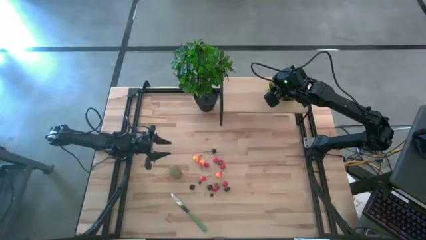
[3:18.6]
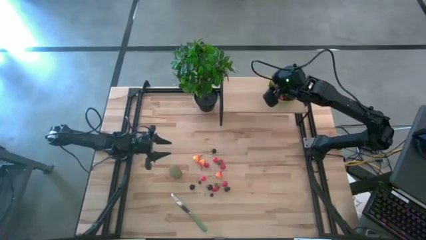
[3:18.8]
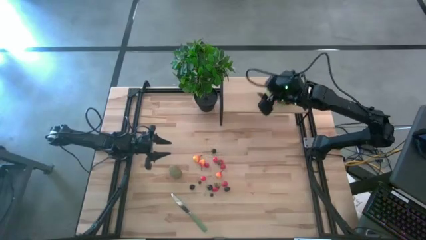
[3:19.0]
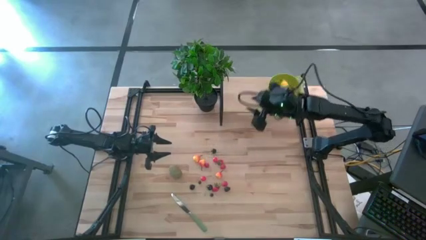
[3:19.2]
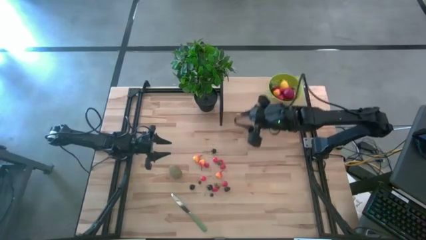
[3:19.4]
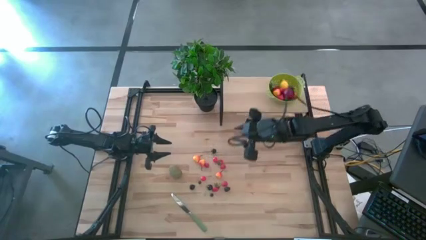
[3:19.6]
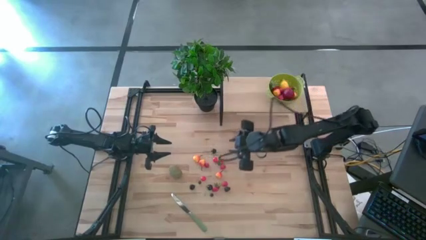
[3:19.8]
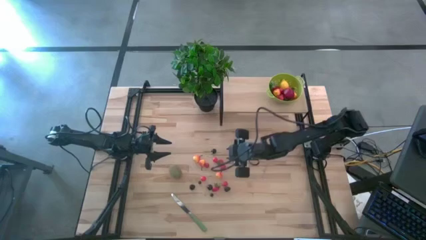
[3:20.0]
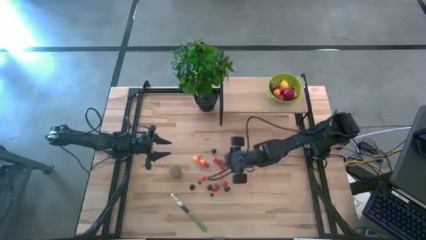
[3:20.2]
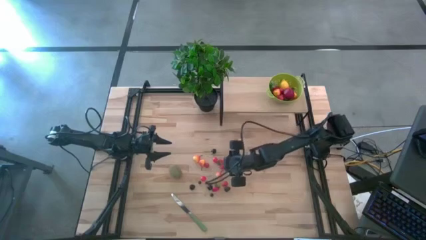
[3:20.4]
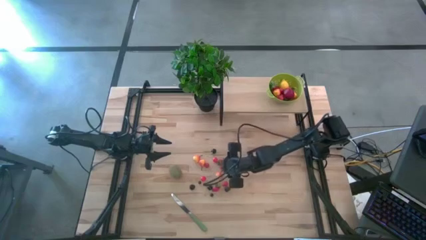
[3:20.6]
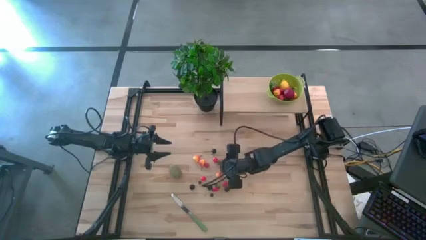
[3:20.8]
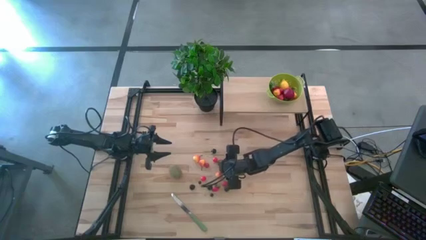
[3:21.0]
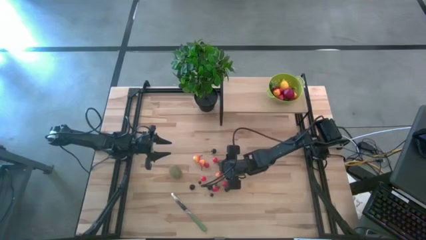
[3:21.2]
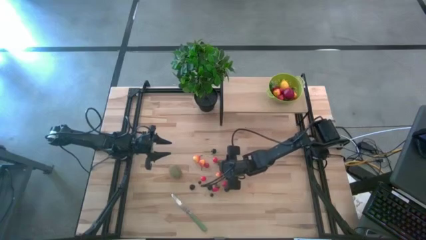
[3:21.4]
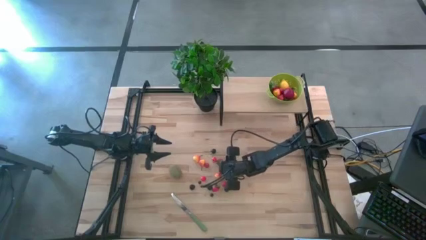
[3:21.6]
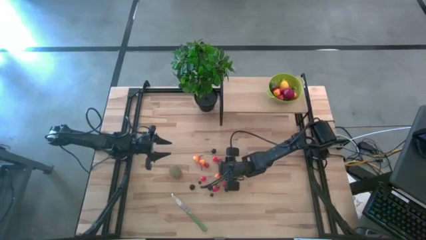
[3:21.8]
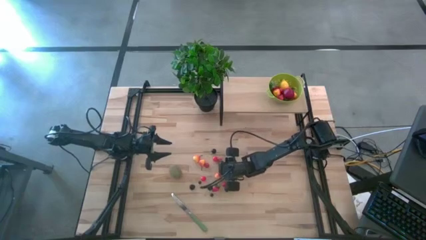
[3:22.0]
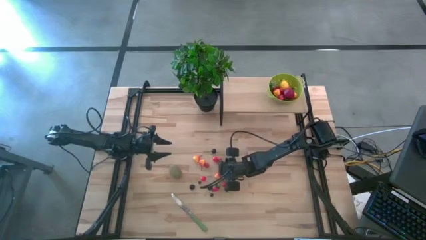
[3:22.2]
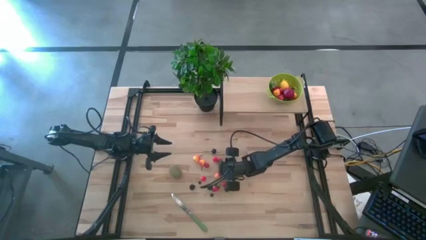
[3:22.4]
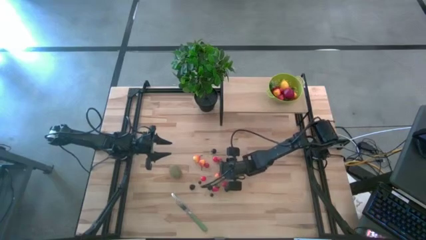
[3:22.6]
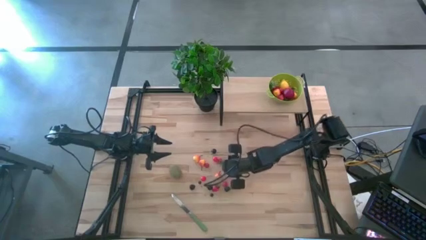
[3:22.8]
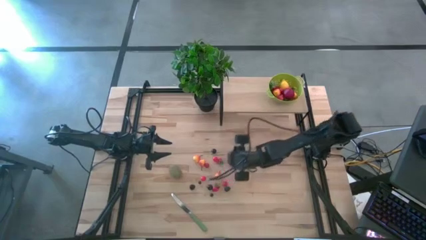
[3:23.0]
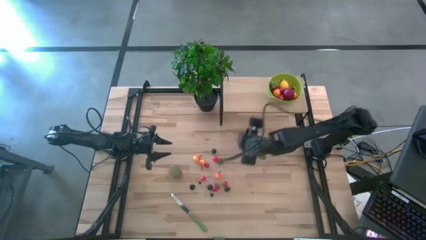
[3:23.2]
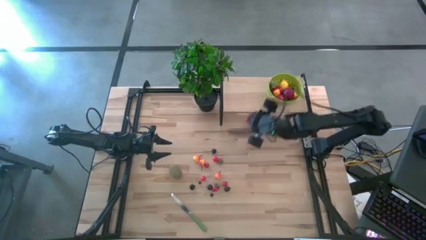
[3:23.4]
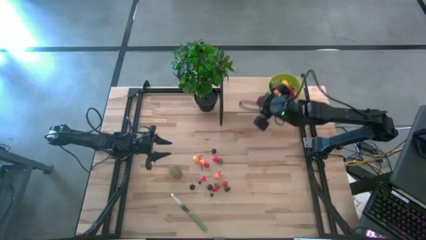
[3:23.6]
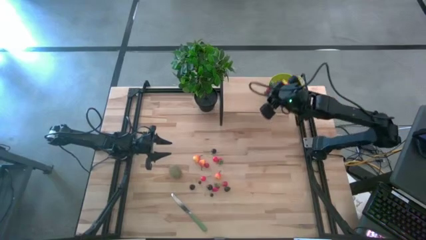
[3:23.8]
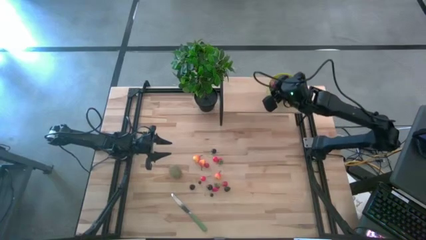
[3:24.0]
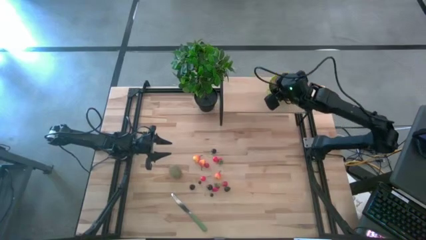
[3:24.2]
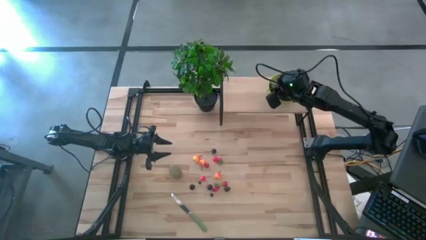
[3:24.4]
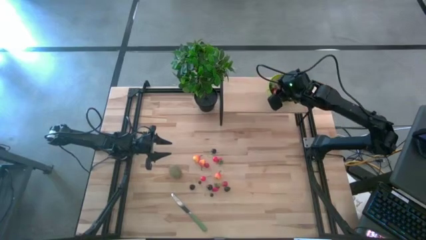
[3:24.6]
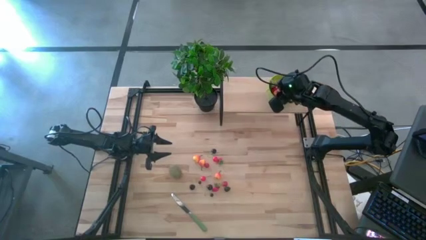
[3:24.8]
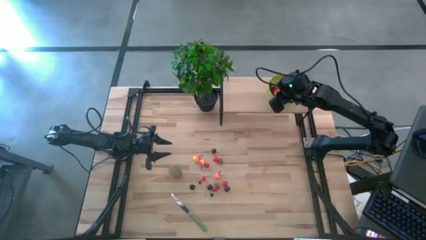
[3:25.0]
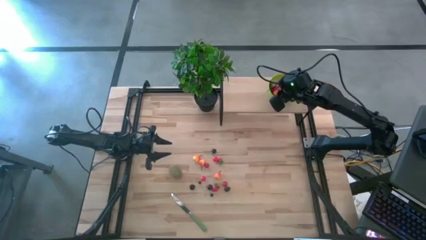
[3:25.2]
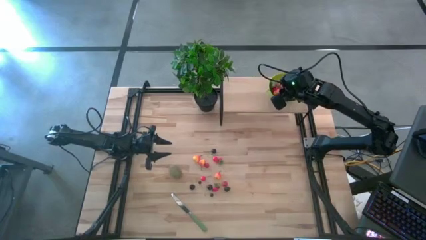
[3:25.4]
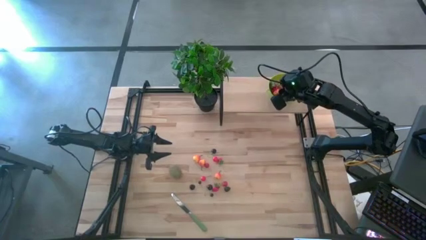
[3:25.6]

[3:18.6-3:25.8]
Task: Pick & Place Fruit
Put the raspberry into the green strainer bowl on the shelf

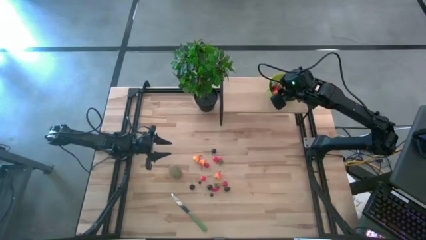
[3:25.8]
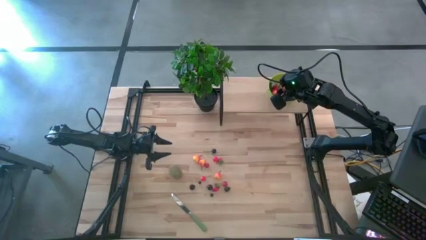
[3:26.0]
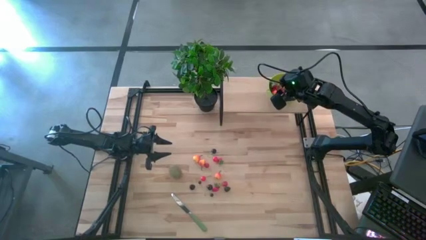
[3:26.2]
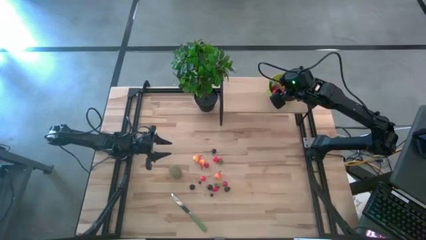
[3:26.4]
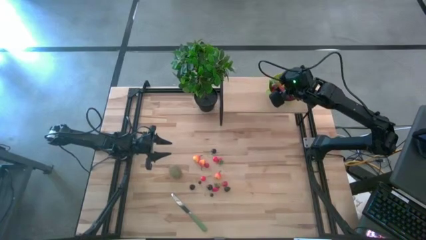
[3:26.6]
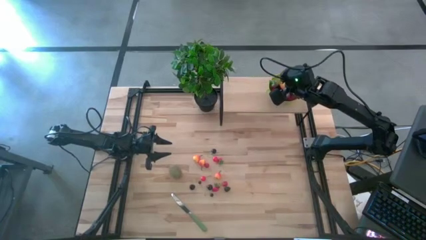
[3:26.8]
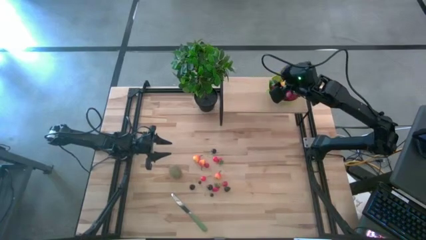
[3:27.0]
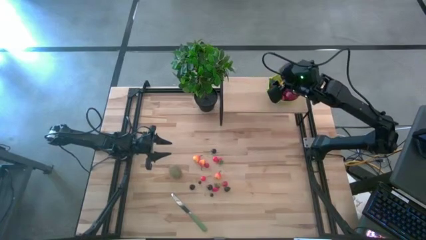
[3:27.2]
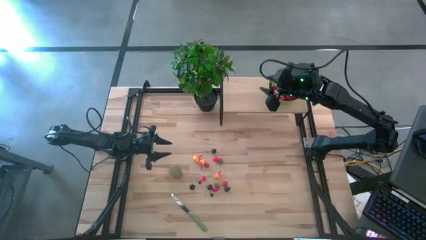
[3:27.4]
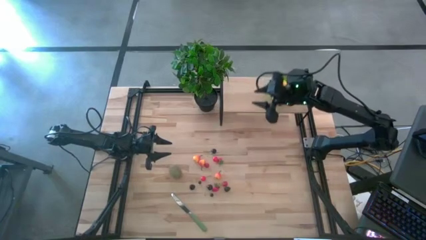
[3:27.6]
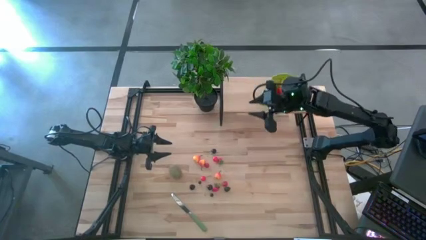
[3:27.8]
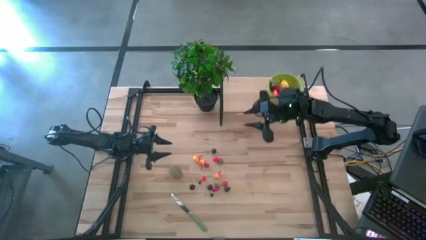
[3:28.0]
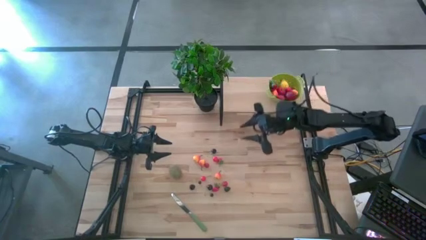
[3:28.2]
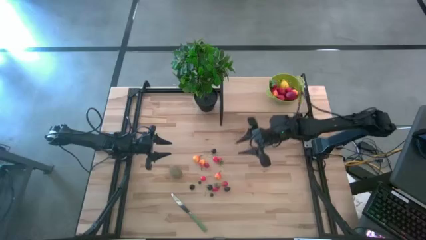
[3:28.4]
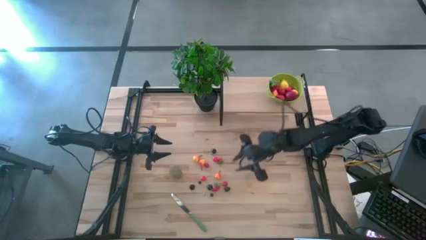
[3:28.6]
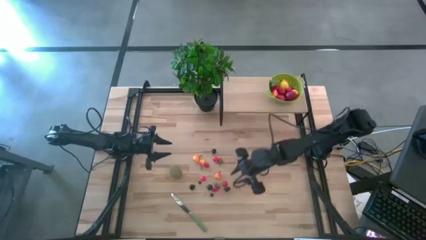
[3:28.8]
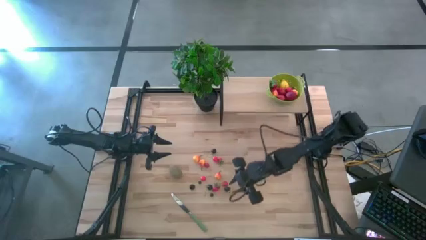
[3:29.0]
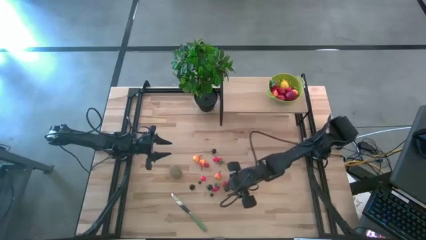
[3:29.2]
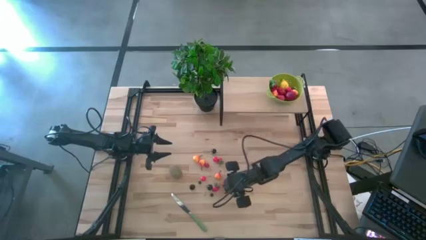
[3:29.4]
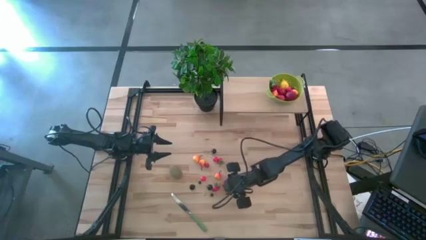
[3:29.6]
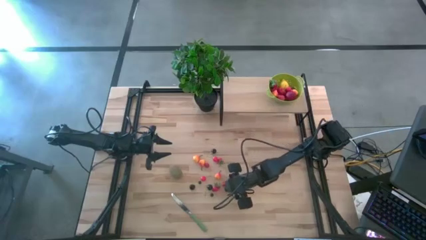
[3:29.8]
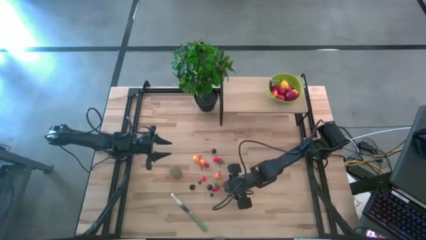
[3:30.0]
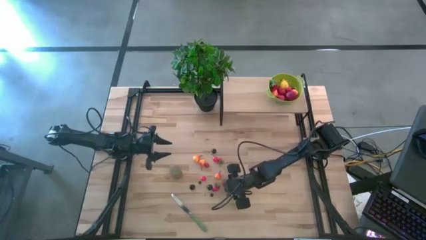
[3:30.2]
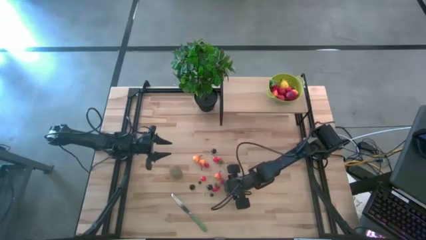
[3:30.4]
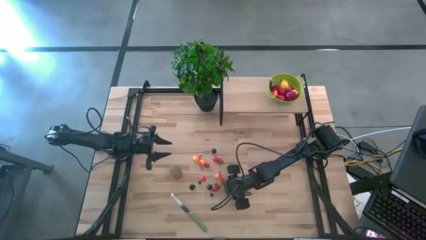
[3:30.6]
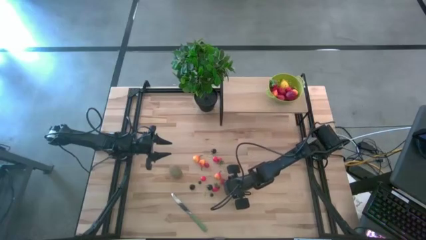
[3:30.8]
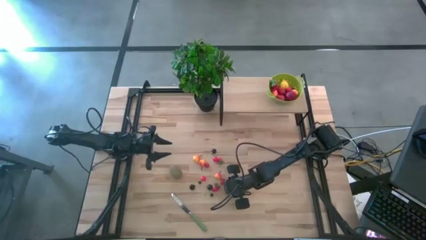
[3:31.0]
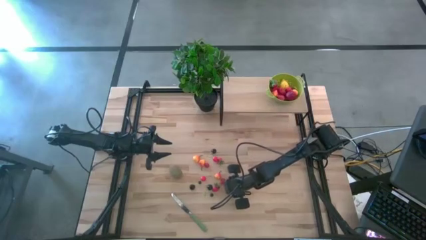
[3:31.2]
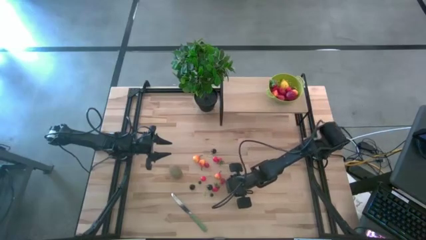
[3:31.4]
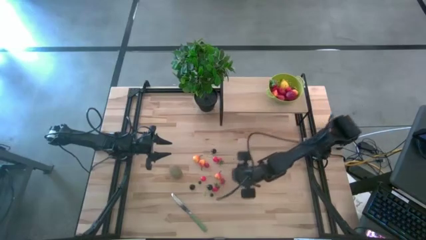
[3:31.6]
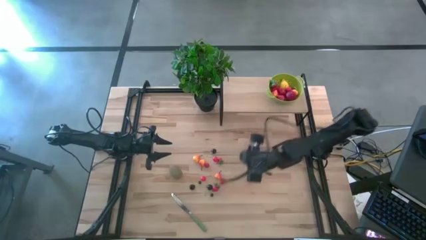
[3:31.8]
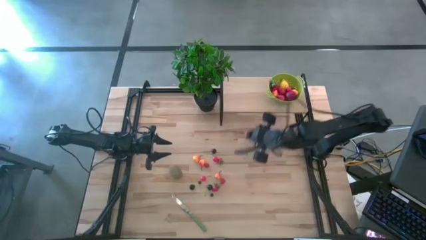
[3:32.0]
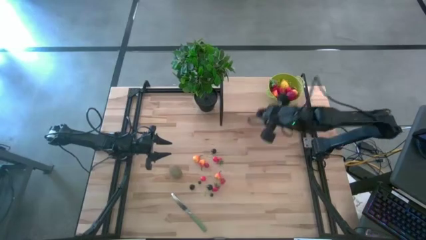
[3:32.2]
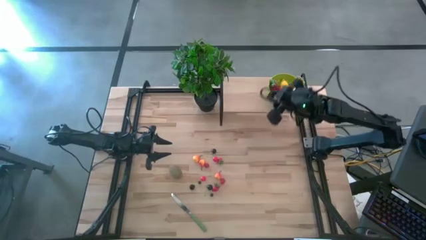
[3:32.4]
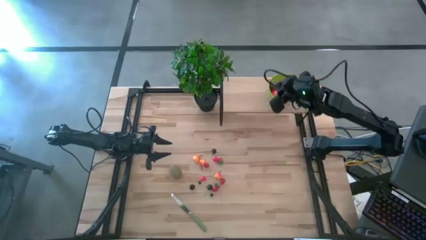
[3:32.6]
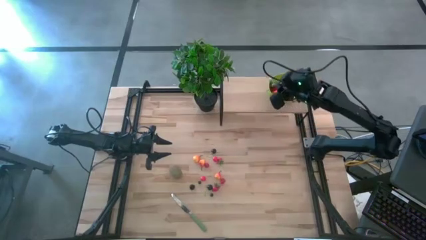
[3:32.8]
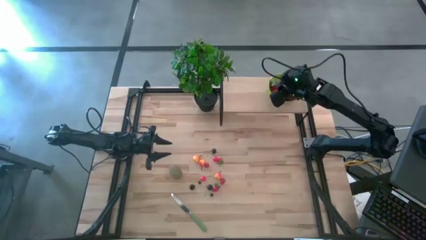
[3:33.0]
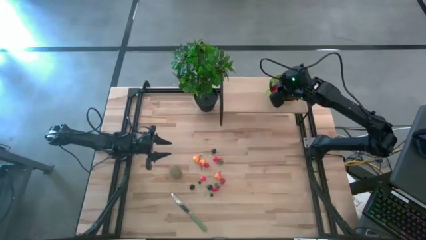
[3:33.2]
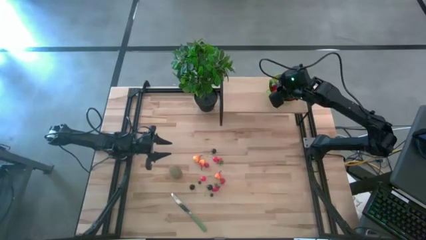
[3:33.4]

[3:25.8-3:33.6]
Put the blackberry into the green strainer bowl on the shelf
